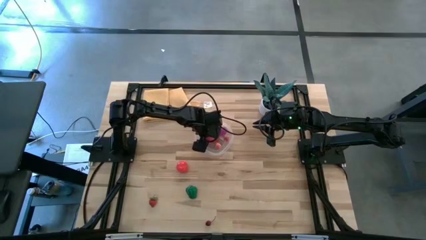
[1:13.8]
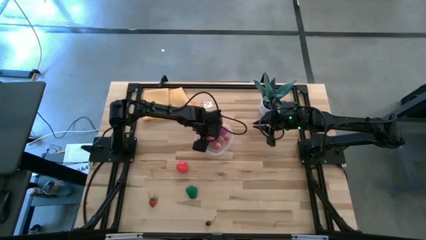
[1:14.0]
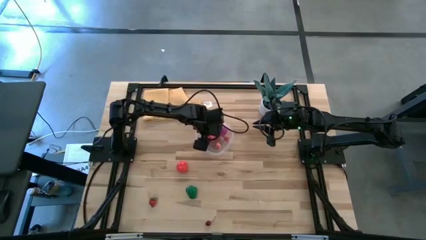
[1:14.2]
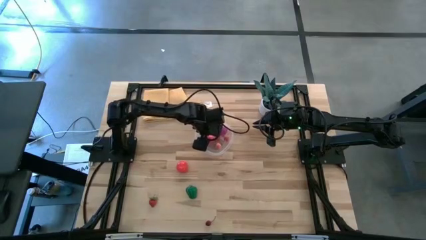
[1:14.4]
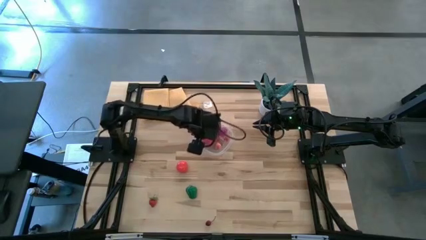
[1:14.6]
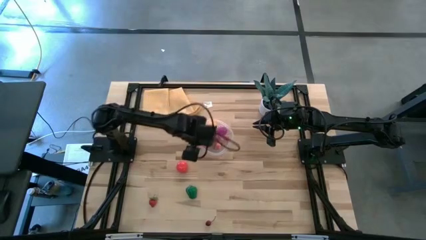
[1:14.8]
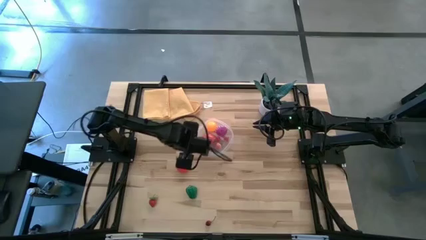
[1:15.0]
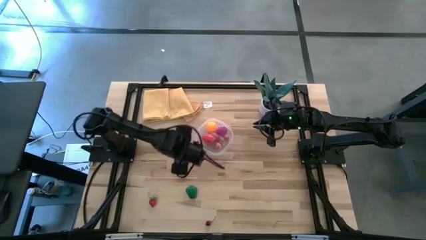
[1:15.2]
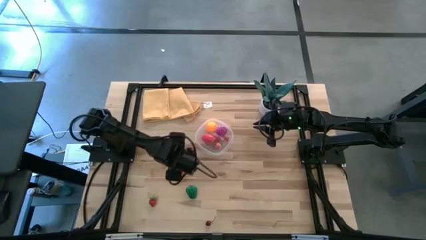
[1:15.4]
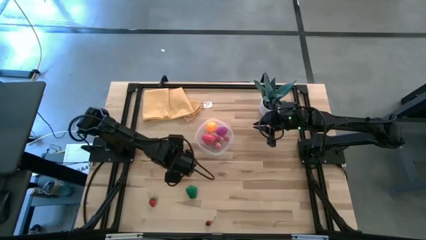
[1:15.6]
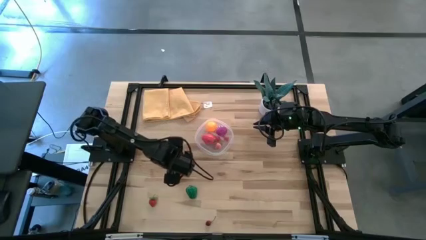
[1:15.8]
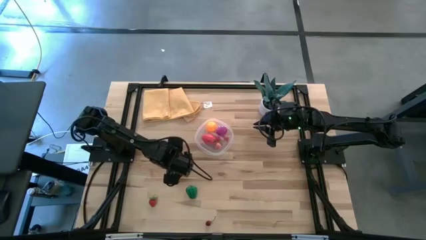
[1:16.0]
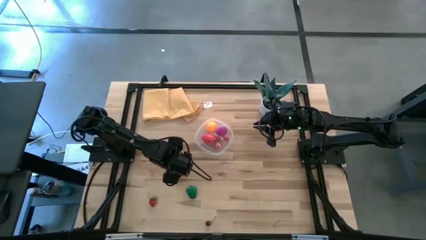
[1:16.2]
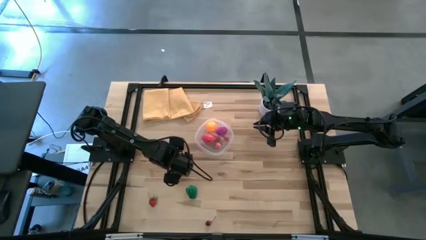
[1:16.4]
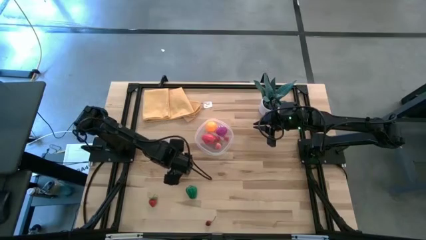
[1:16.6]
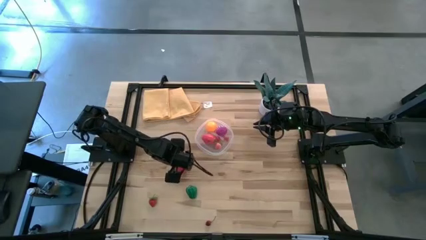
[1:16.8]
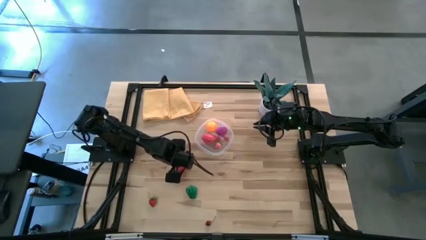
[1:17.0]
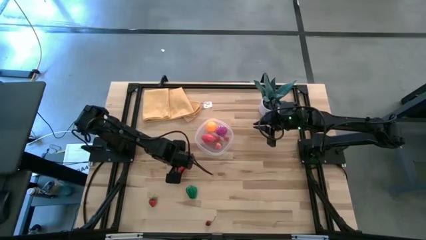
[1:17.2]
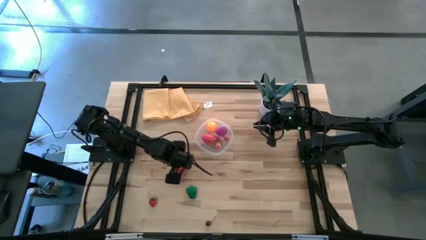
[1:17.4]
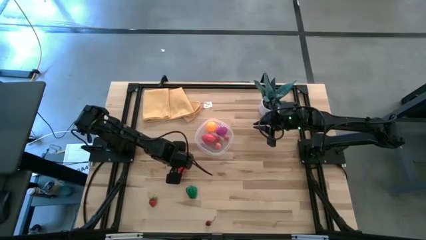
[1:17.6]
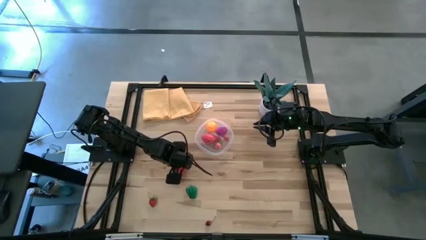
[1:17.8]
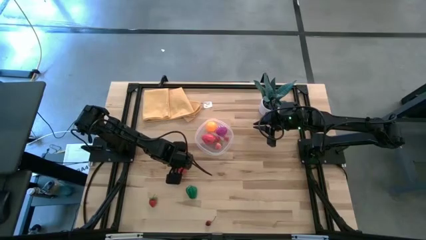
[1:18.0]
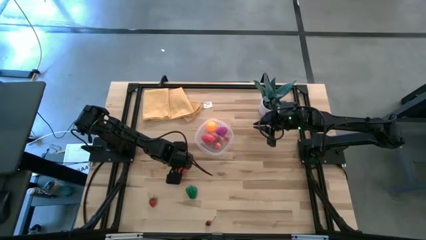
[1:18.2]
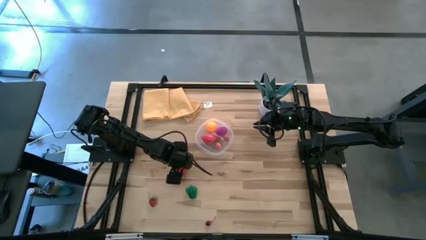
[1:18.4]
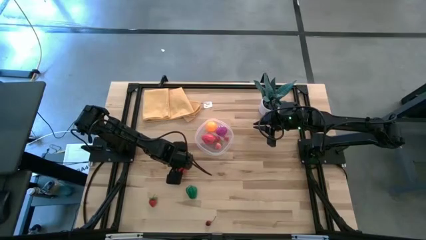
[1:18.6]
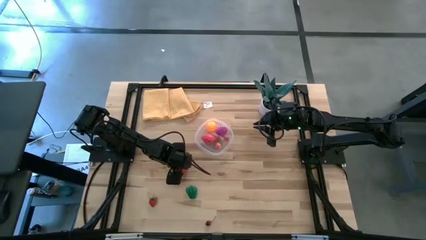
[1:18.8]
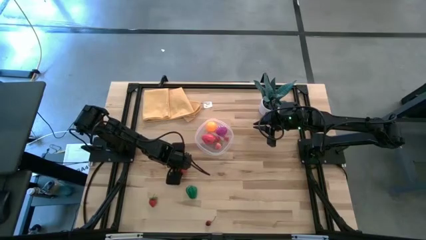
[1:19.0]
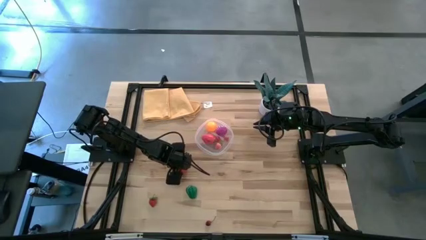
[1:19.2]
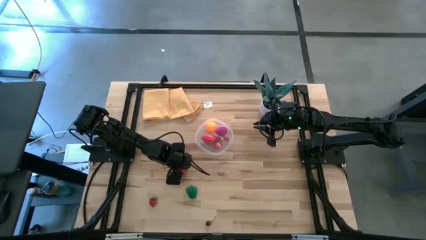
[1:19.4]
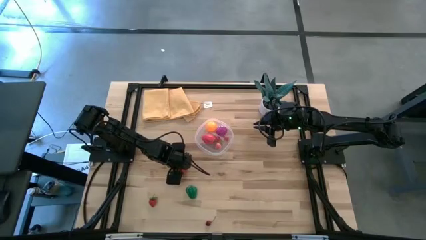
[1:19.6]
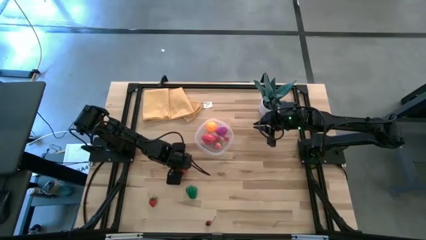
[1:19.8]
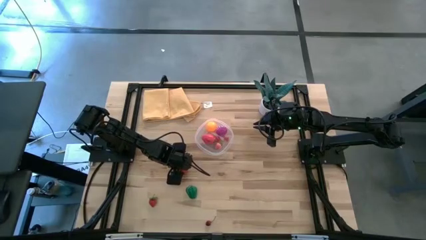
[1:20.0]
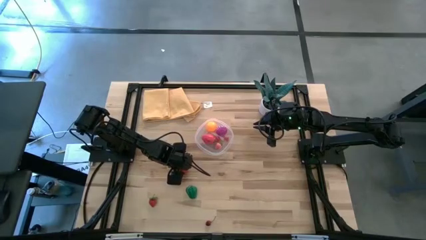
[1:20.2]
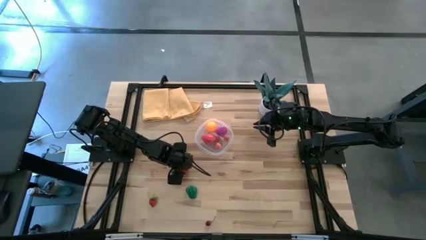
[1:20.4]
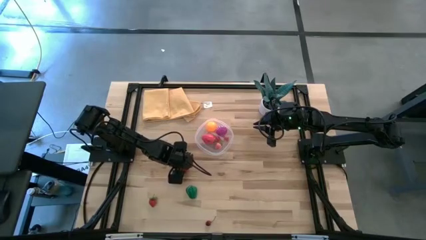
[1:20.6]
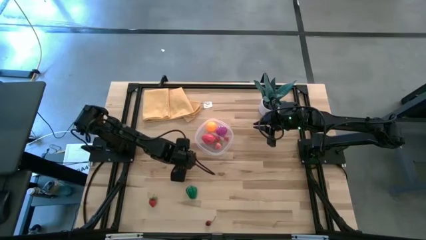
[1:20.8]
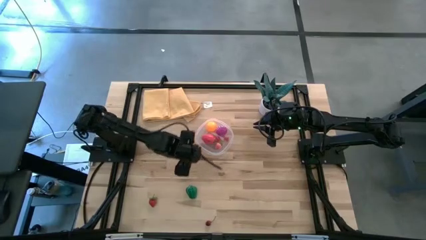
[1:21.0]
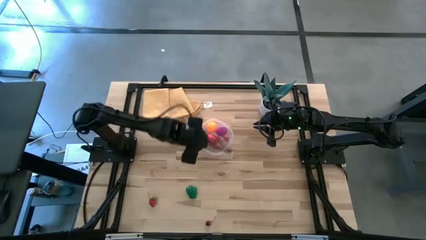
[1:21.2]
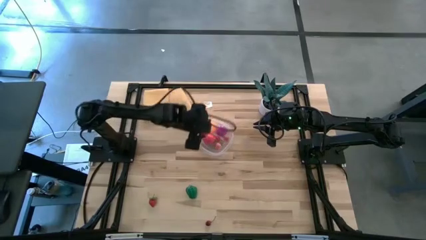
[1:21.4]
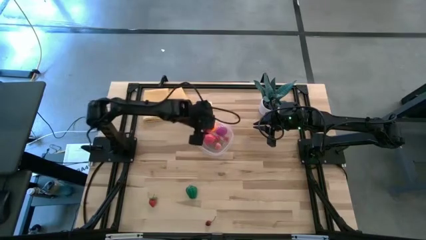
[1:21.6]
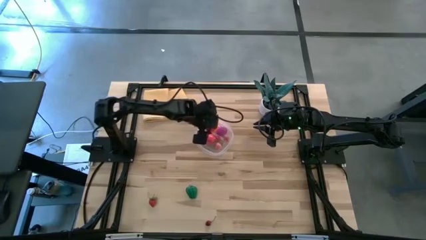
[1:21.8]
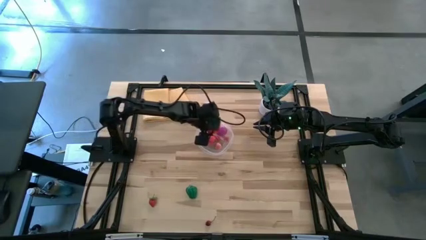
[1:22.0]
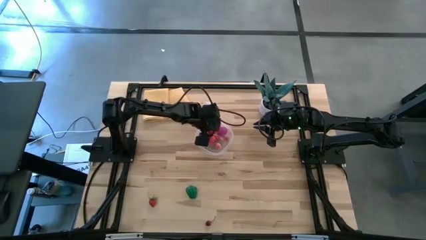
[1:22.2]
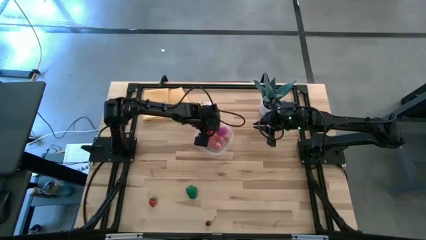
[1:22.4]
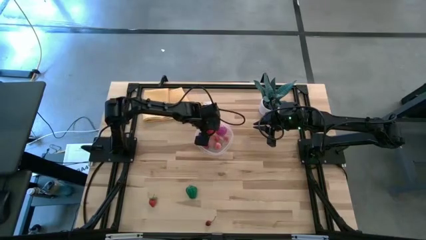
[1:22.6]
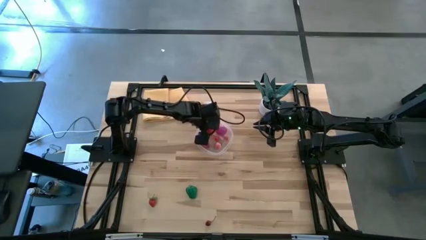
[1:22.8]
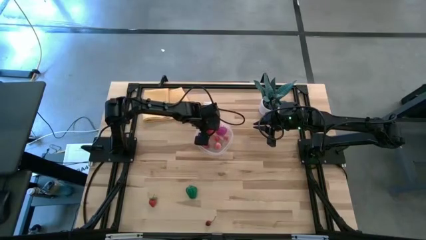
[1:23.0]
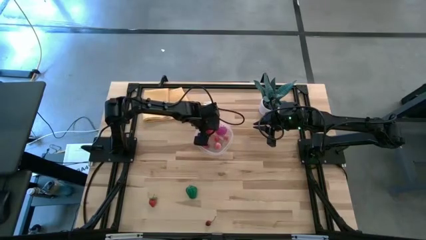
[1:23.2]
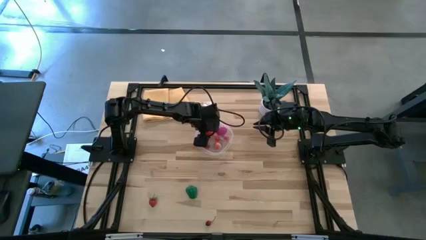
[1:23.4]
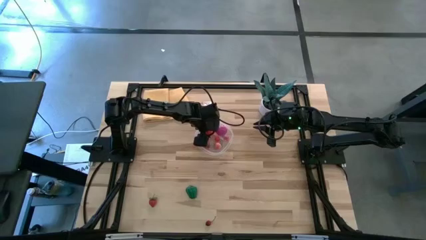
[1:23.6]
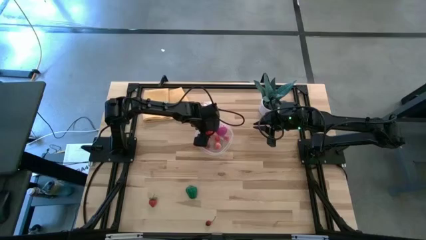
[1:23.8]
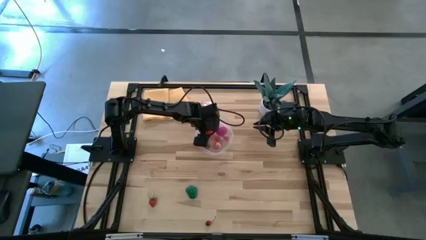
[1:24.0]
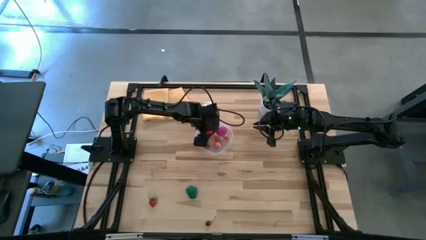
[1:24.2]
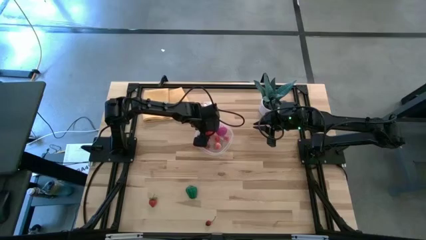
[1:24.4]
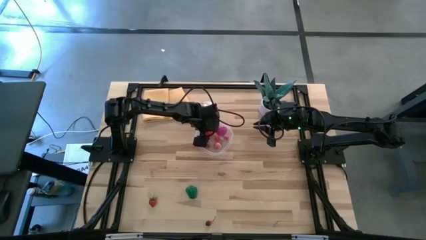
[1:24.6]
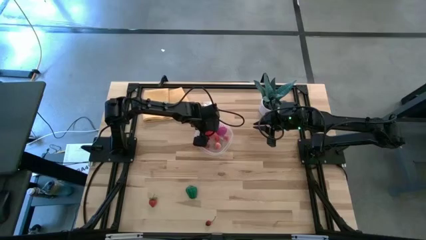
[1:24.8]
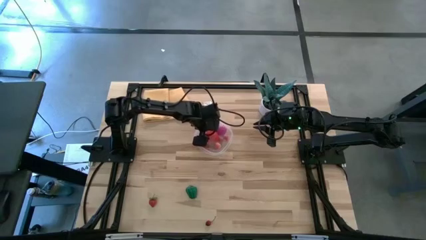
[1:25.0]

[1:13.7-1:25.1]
Task: Pick and placing Produce into tupperware
Put the tomato into the transparent bin

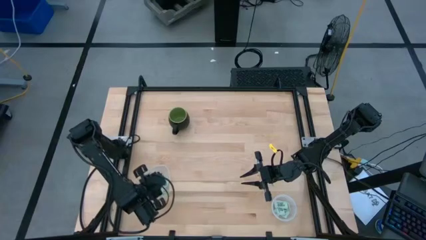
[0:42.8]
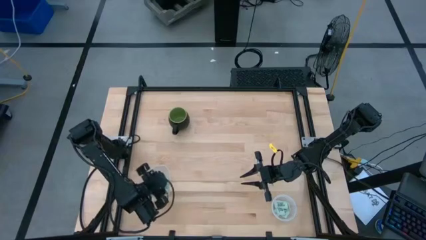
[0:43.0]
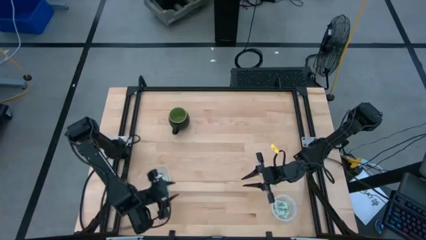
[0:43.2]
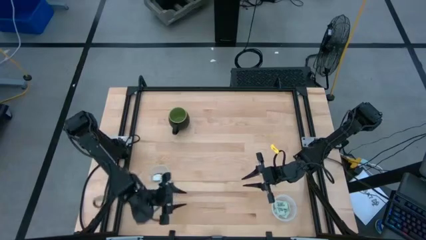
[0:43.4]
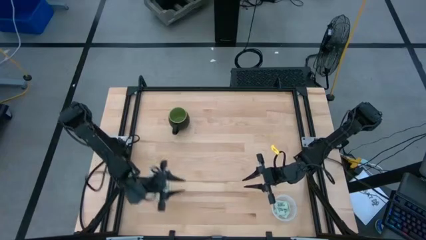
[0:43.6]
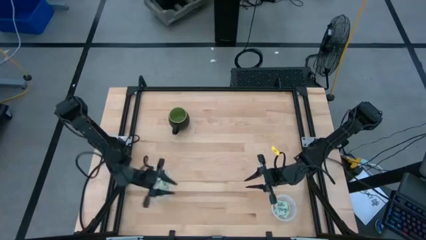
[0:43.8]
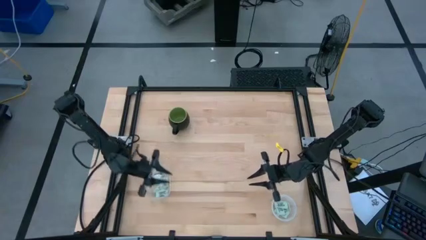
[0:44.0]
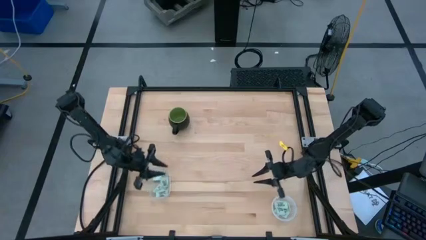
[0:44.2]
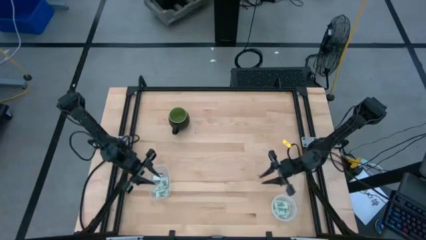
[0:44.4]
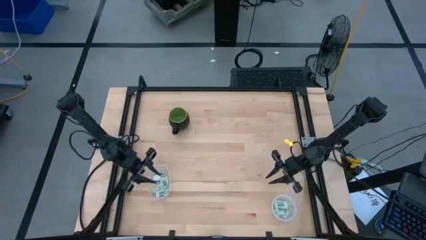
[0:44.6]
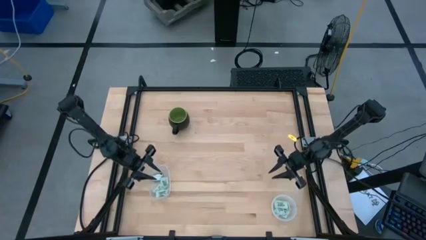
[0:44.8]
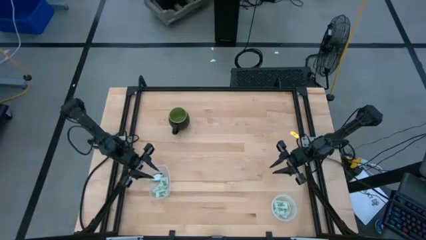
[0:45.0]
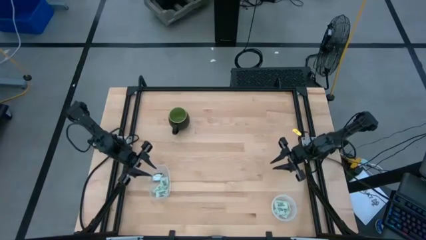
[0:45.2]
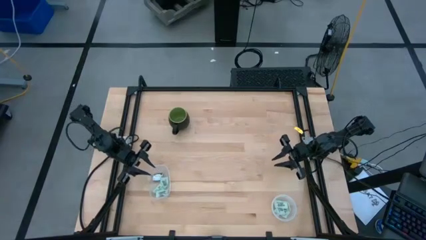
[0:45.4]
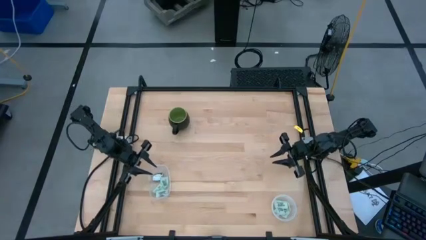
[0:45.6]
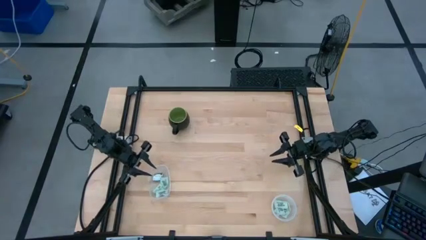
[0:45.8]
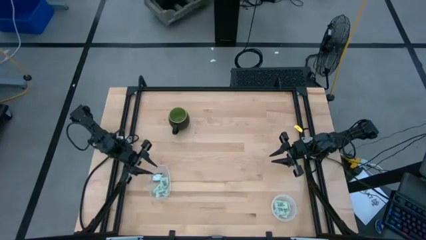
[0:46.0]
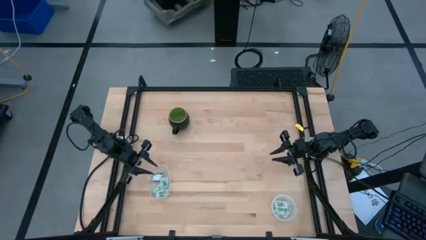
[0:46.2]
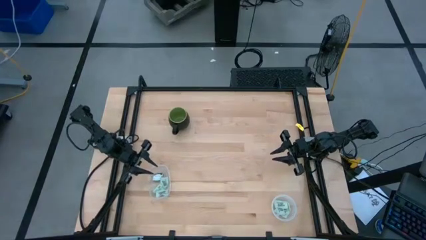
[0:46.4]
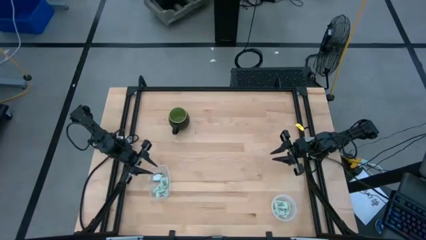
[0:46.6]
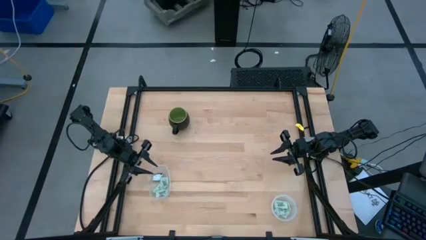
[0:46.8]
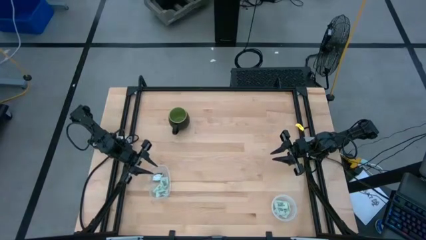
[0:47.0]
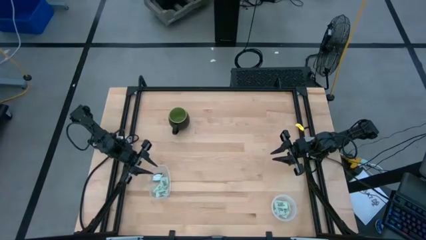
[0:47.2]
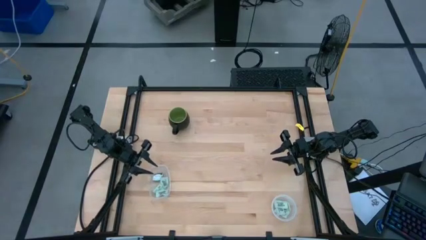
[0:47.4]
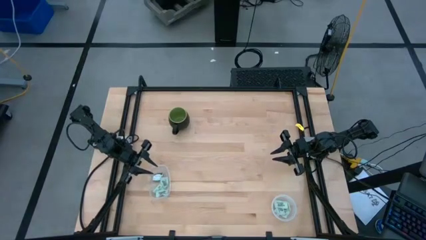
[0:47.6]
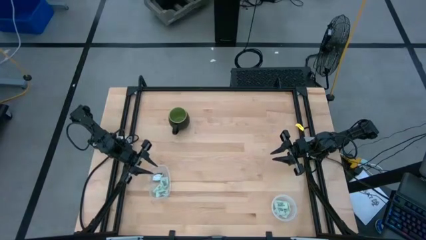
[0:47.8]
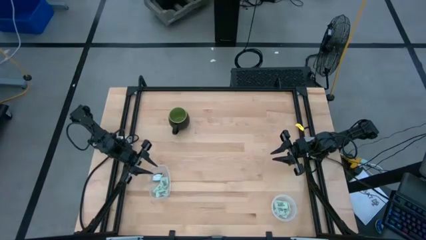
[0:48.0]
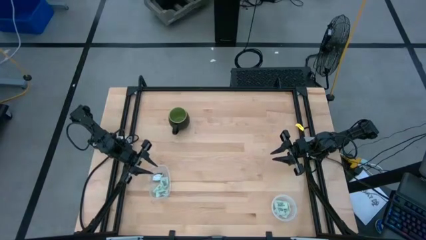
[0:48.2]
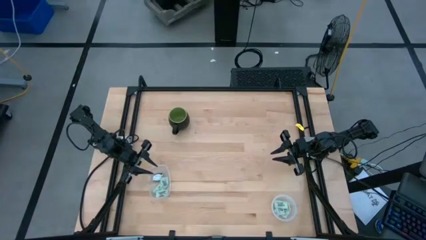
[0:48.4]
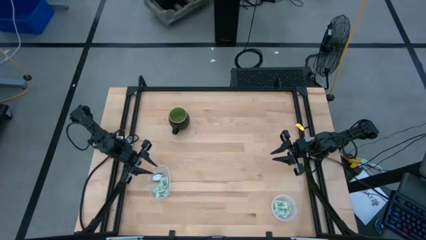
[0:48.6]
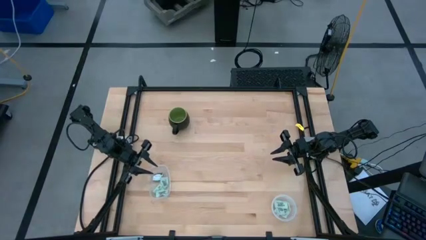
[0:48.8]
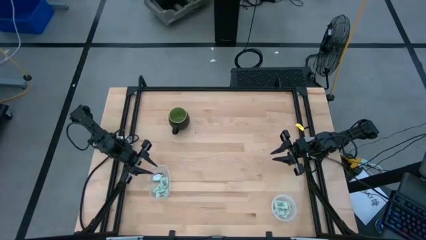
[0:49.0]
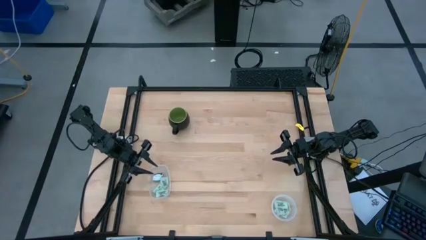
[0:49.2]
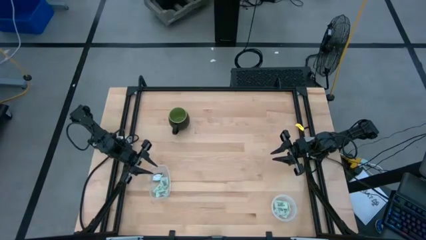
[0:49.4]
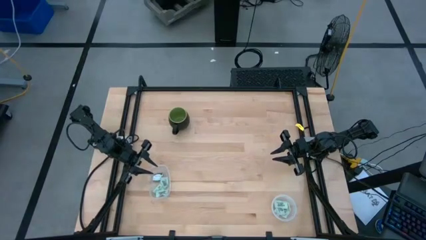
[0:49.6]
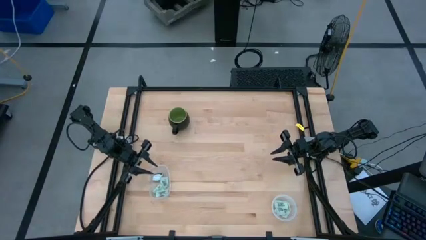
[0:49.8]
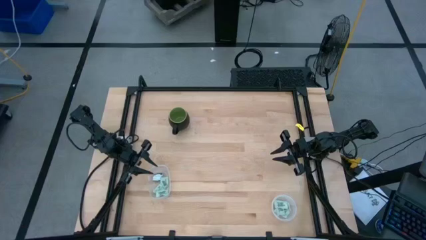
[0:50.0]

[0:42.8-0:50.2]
Task: Pick and place Stevia / Truvia into bins
Return to Home Position
